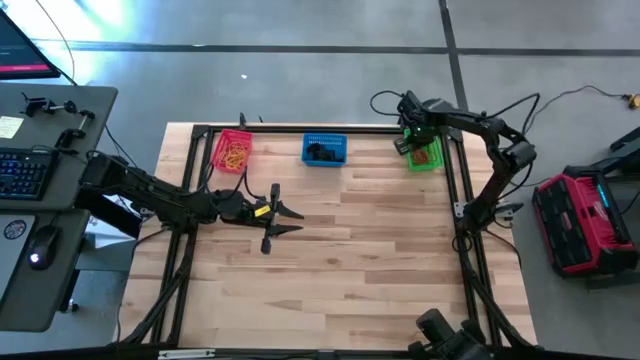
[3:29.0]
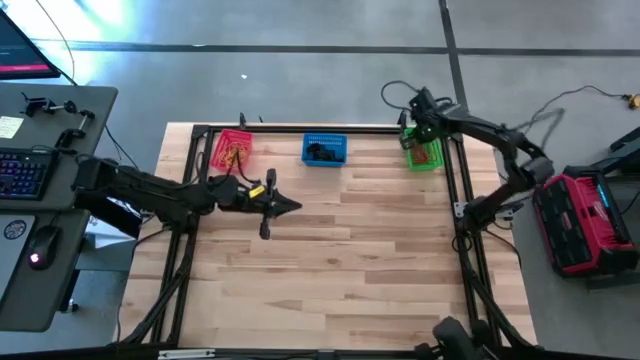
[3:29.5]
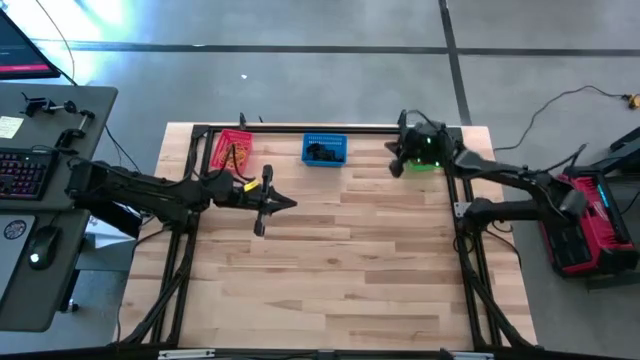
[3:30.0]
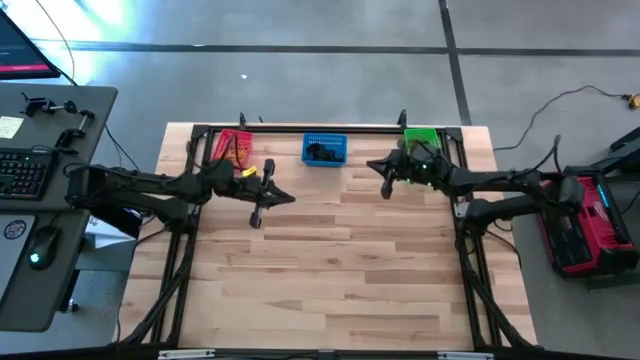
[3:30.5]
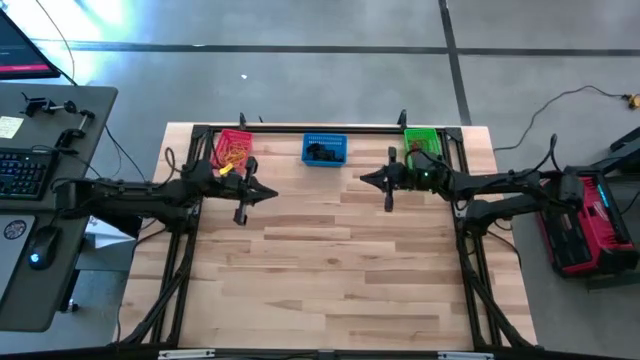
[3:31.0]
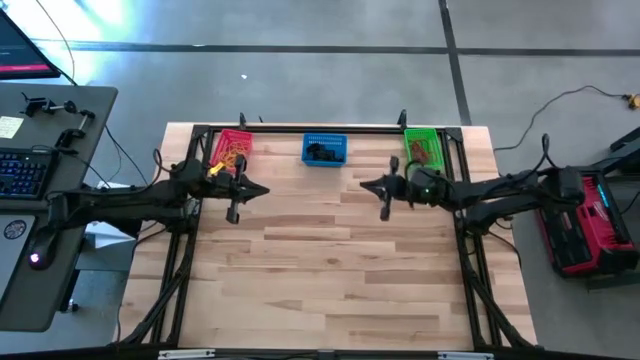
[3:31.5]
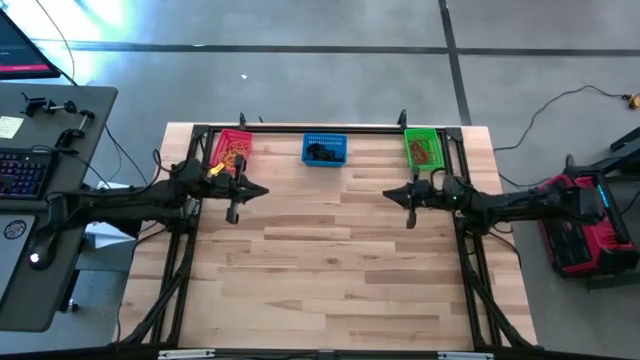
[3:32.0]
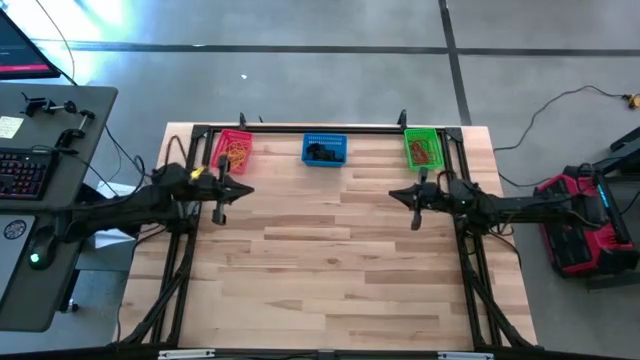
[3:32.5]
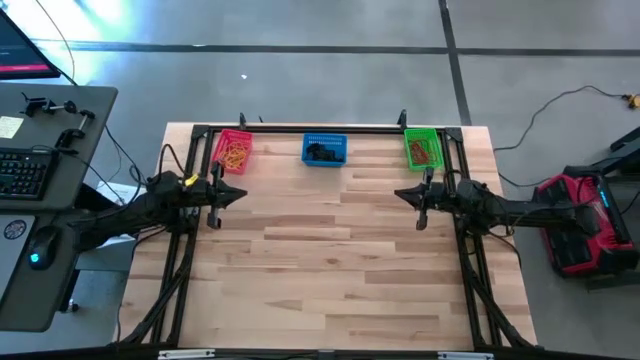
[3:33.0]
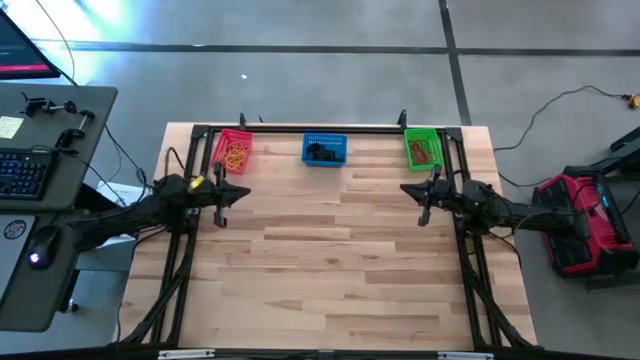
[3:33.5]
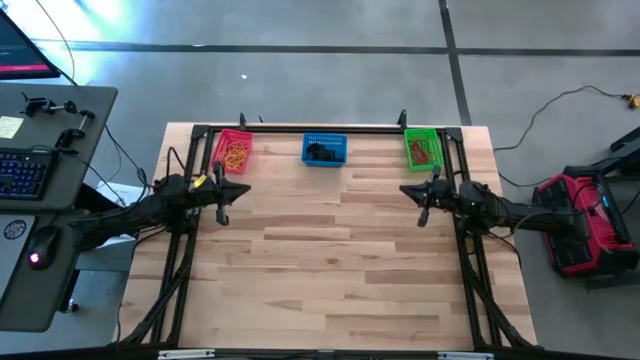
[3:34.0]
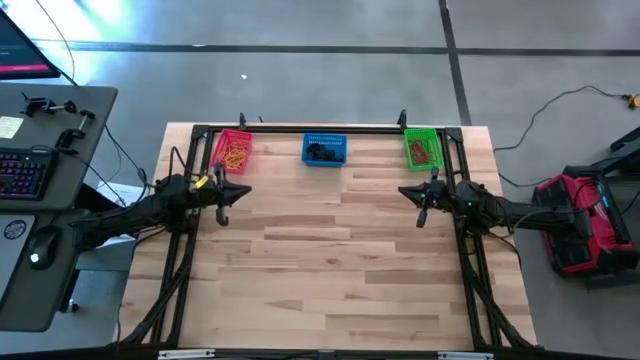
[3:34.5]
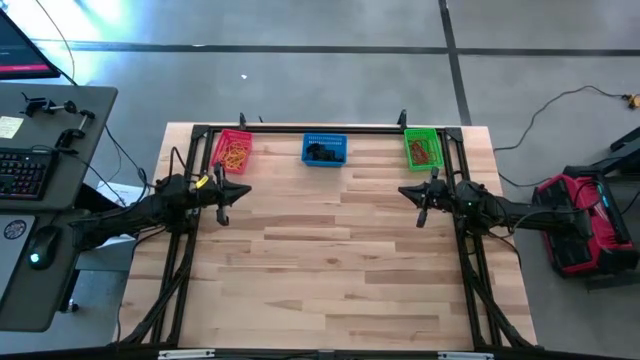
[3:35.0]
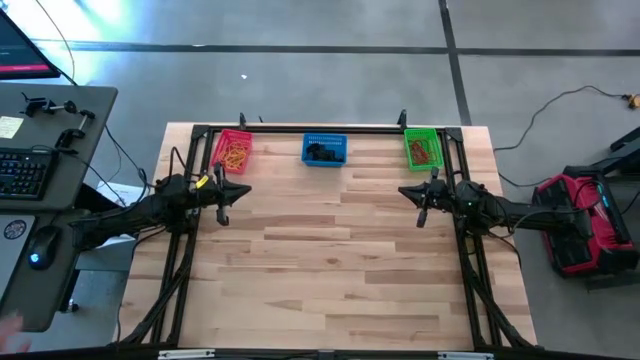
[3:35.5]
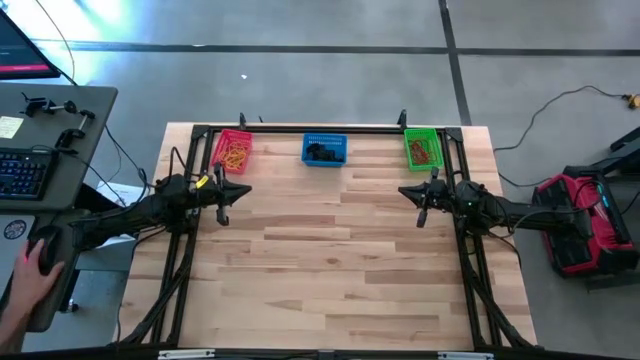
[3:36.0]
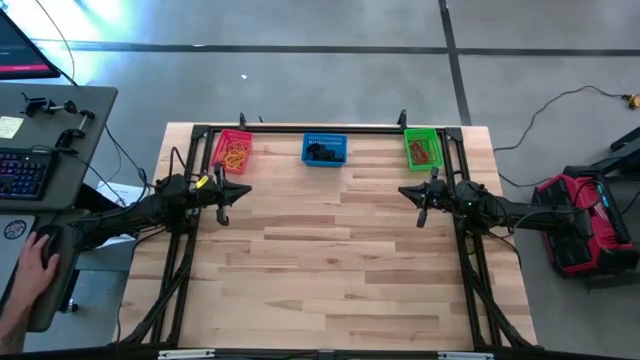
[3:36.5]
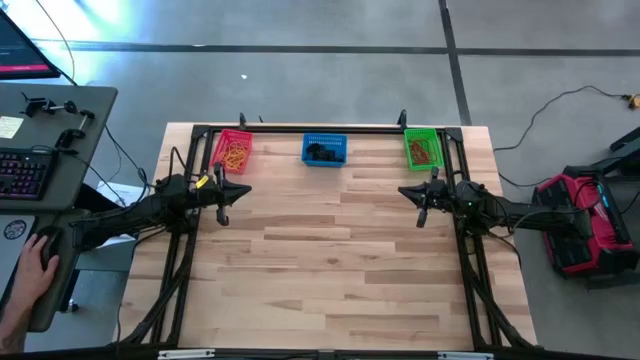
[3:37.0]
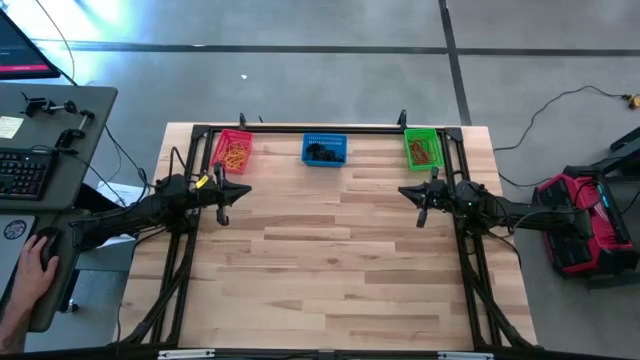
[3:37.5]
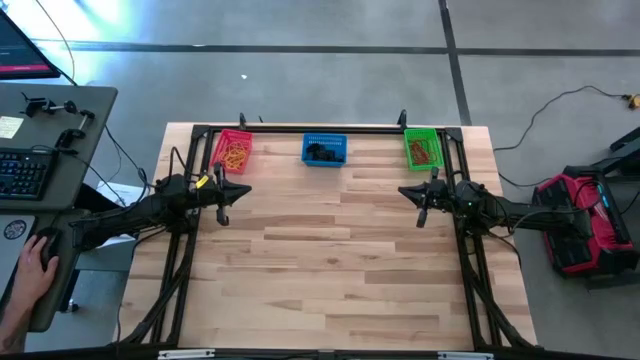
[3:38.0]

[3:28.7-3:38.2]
Task: Sort rubber bands into baskets
Return to Home Position

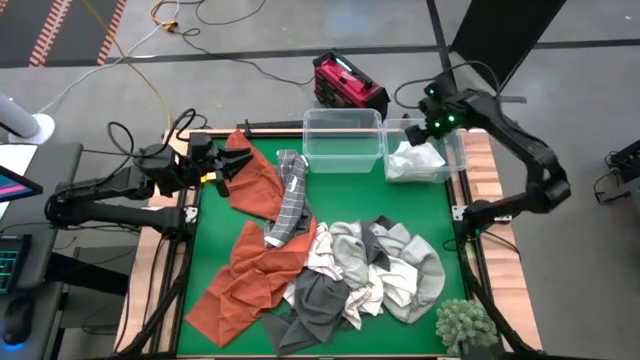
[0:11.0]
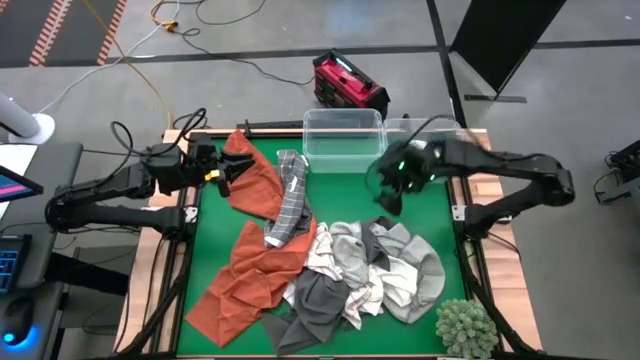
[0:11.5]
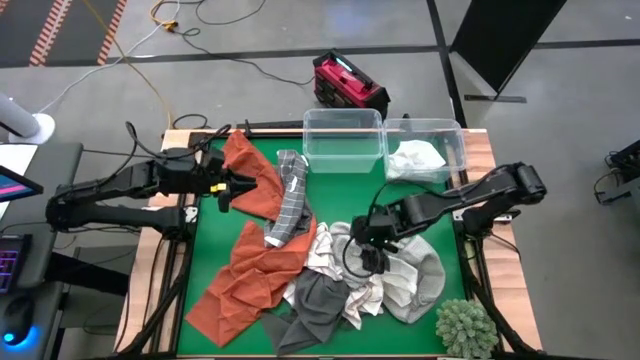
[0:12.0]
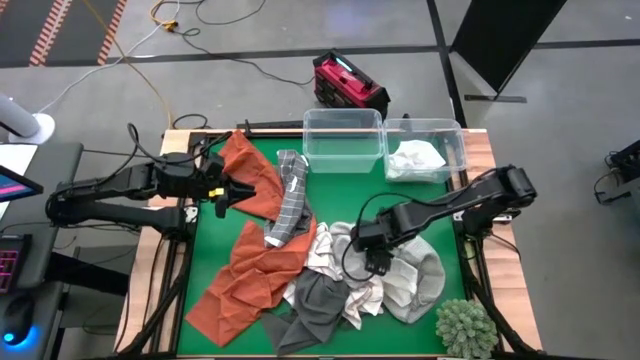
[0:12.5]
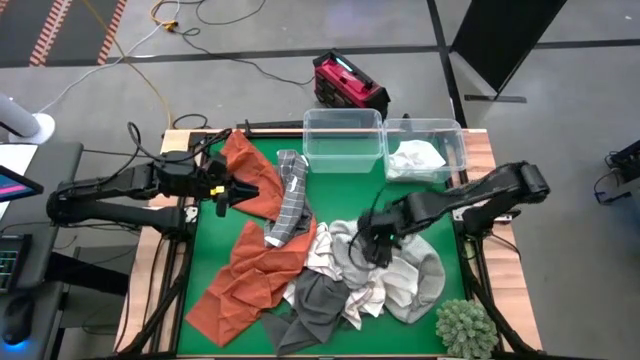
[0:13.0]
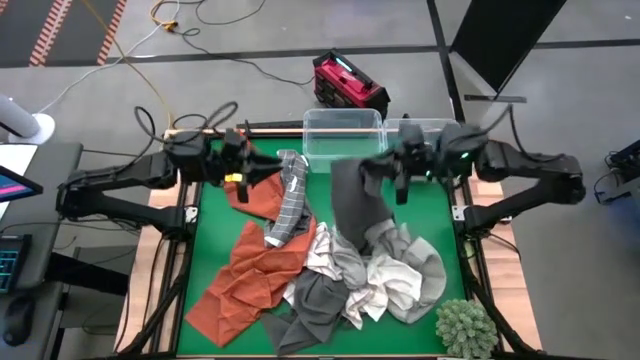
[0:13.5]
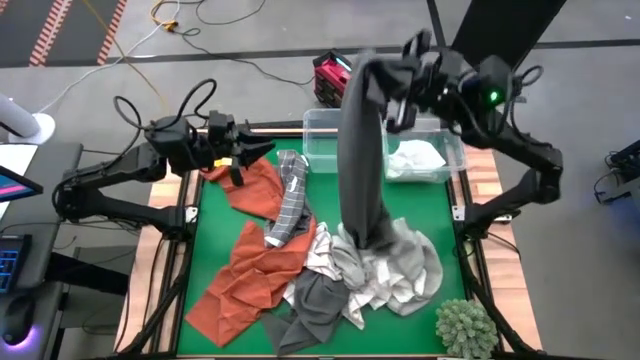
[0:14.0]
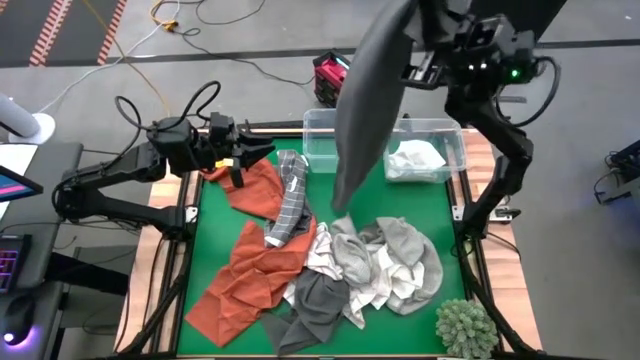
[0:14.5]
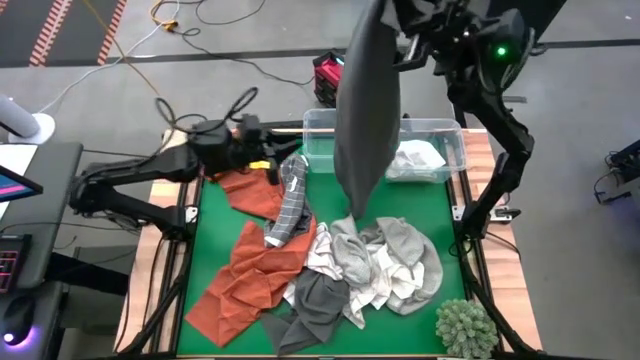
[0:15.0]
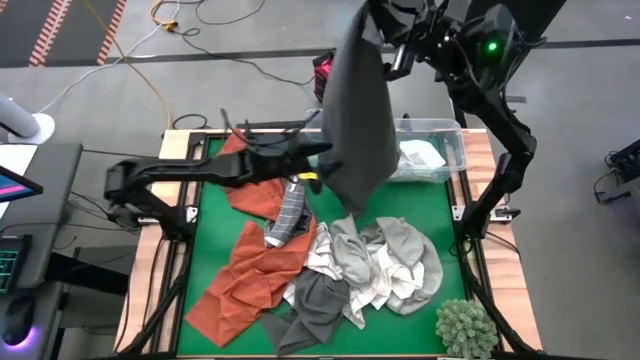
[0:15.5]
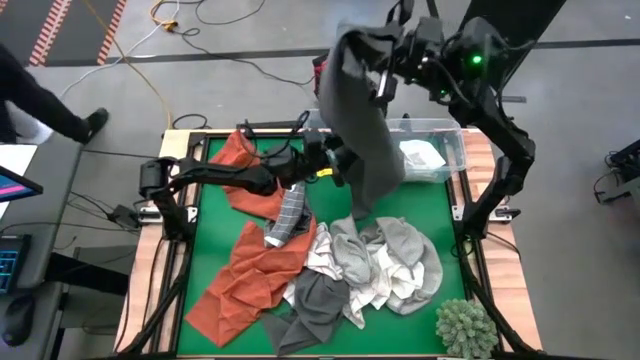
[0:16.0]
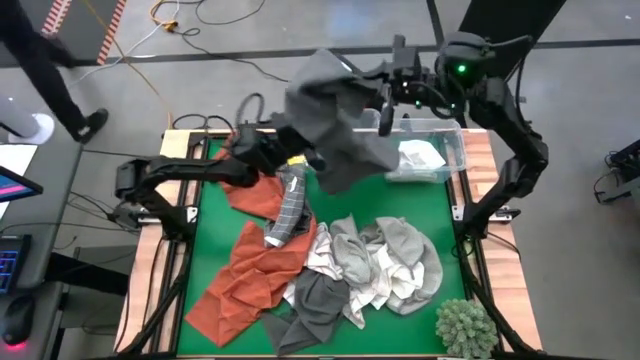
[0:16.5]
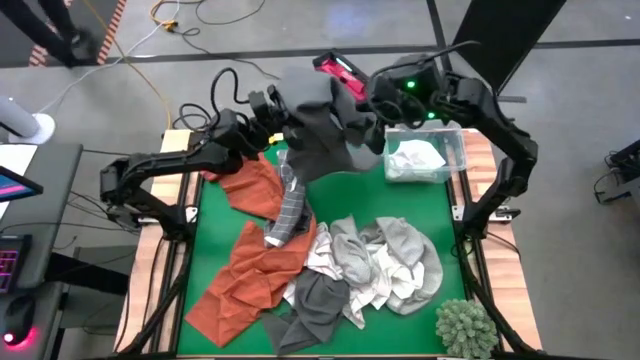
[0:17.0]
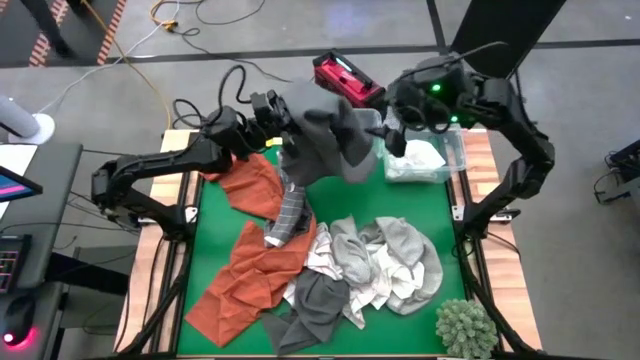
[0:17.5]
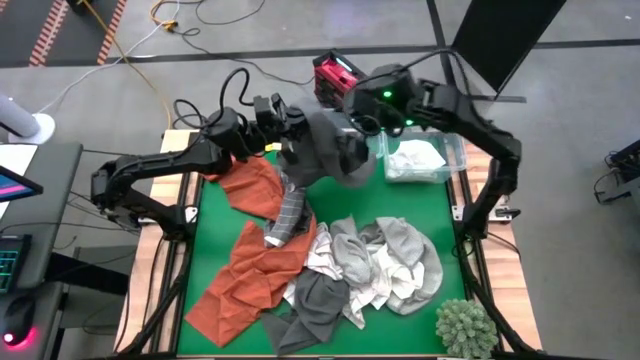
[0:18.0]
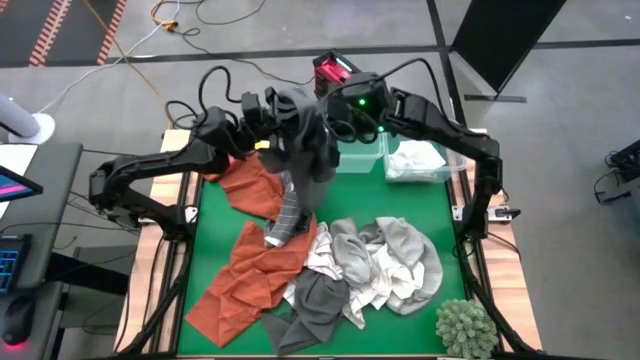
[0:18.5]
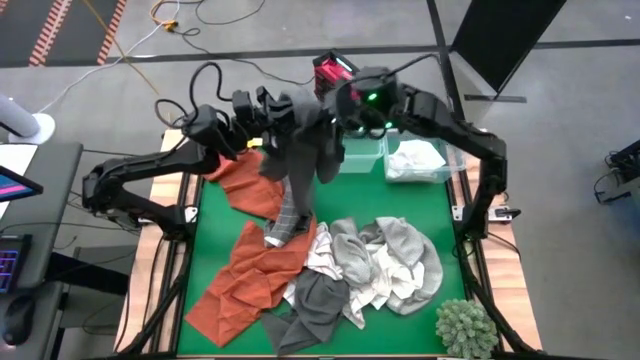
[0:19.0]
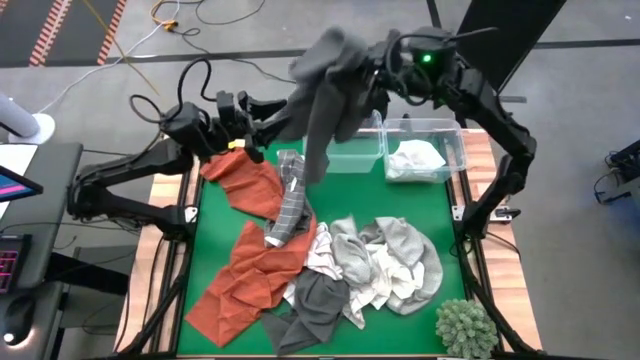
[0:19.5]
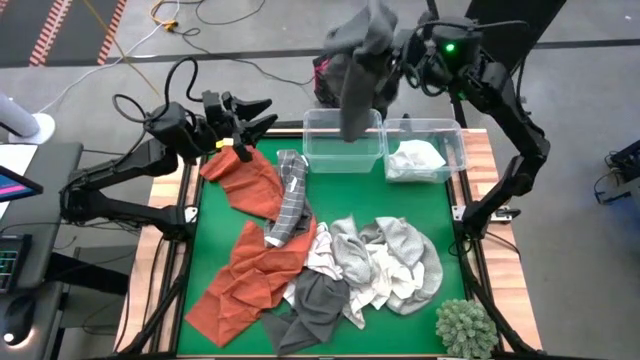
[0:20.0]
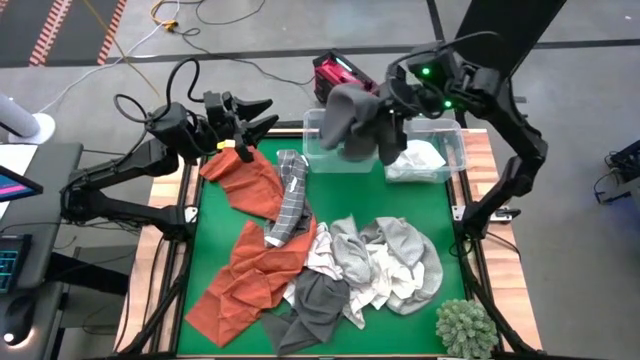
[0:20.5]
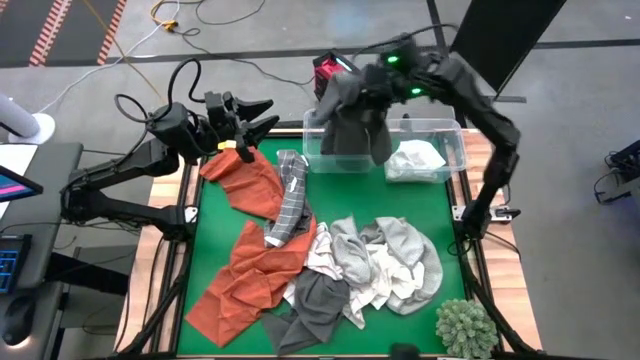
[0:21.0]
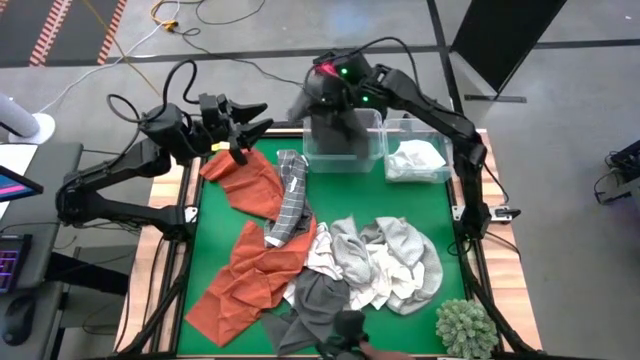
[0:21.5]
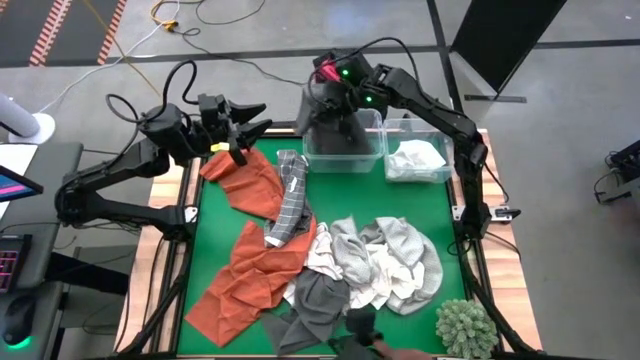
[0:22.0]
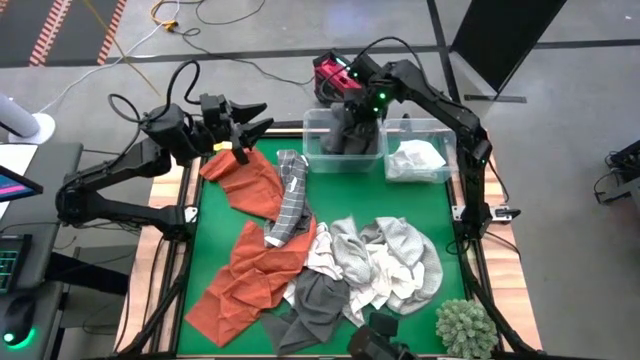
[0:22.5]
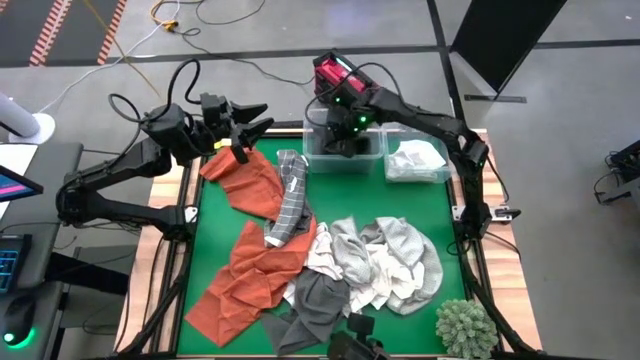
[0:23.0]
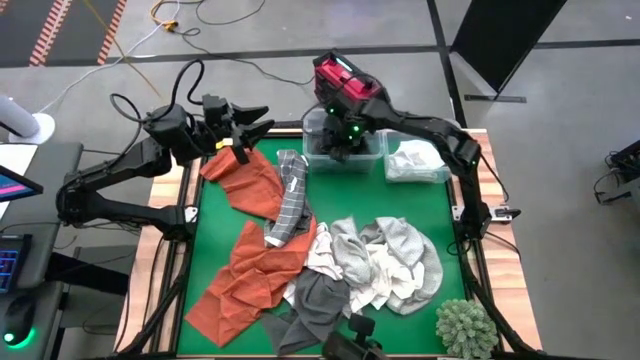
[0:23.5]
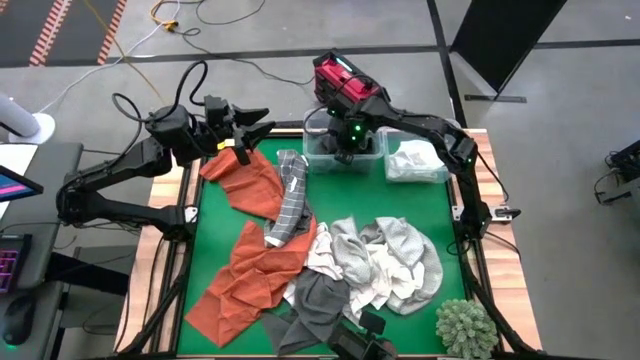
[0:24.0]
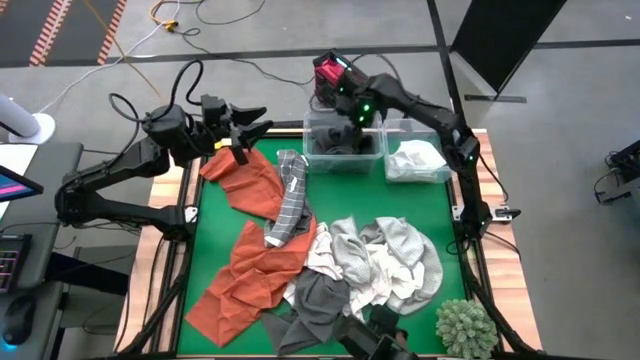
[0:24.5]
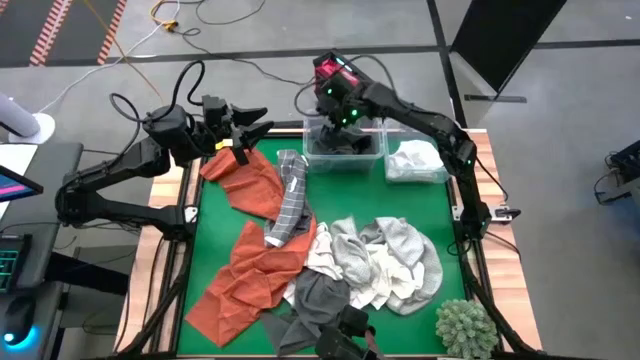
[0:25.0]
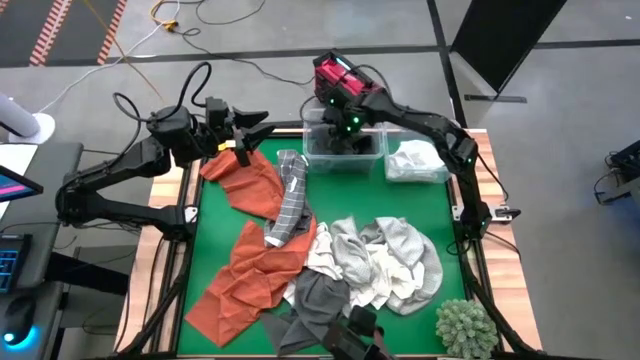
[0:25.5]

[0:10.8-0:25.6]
Task: Sort towels by color in basket
Put the gray towel into the left transparent bin
